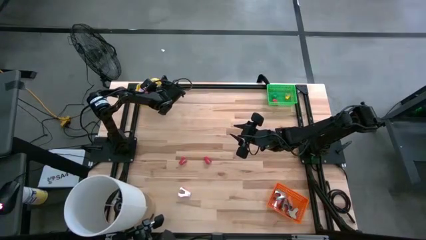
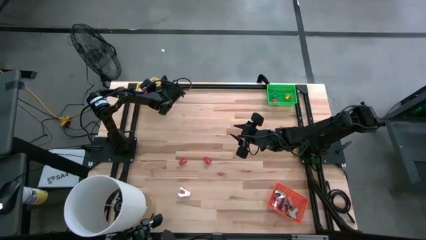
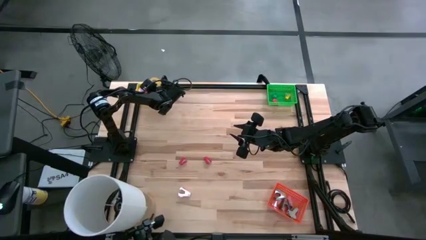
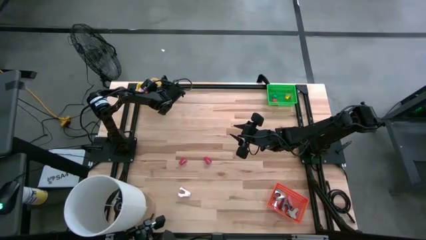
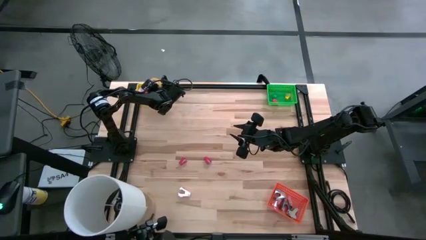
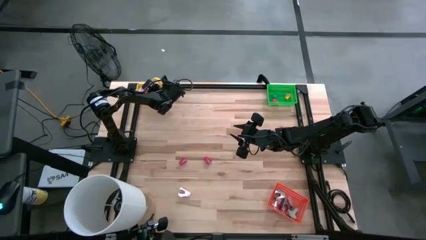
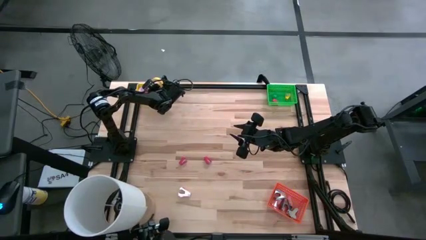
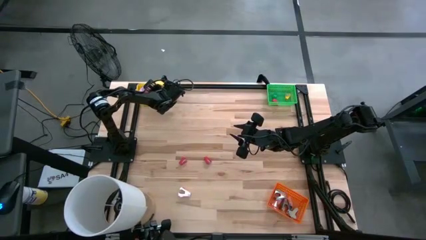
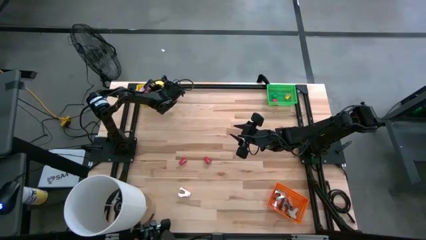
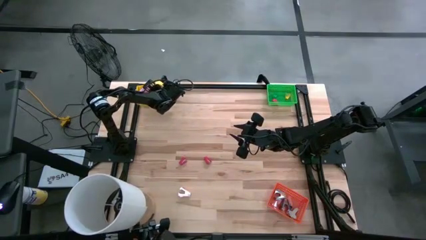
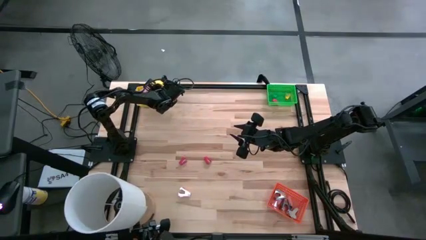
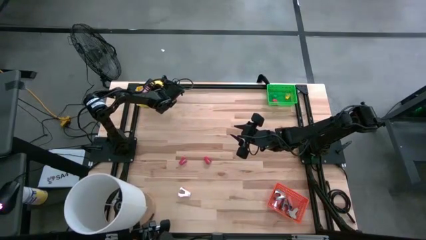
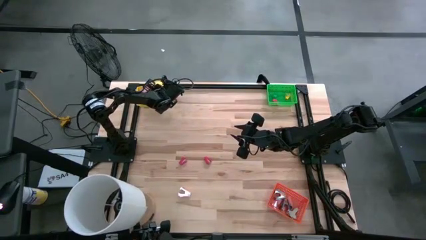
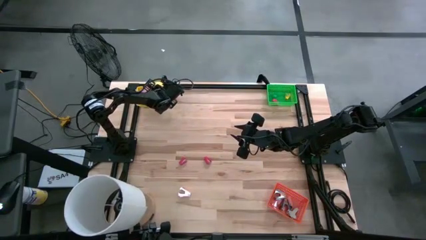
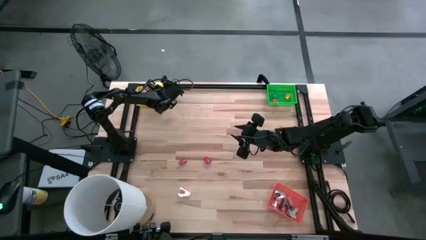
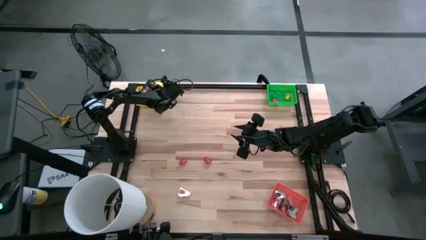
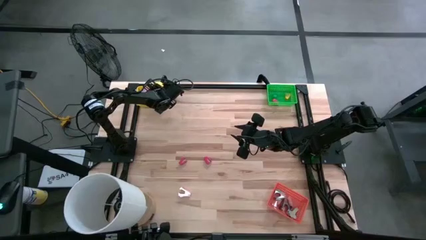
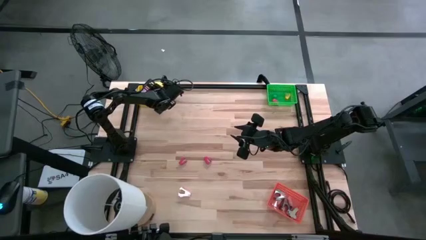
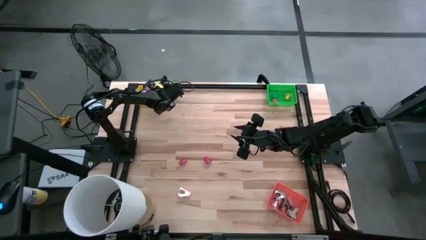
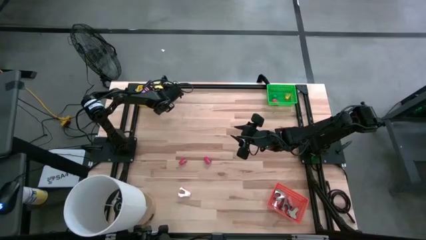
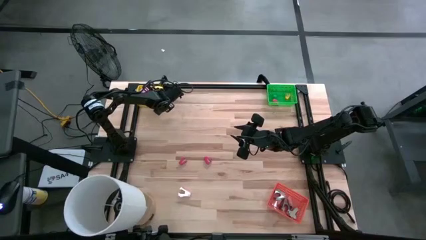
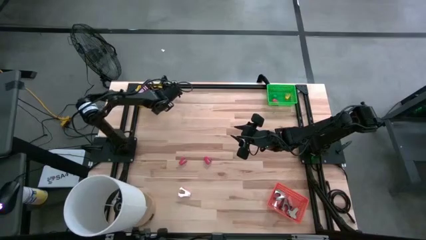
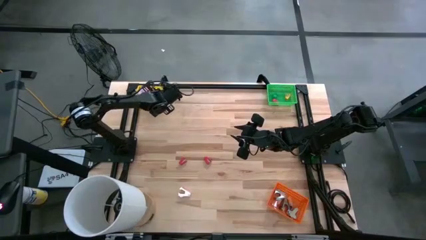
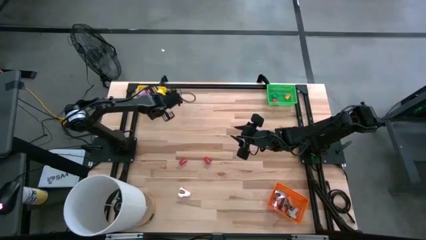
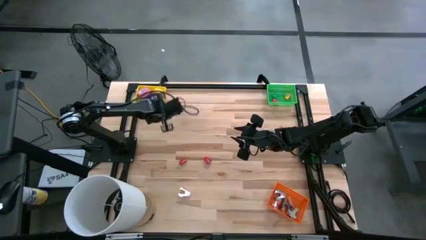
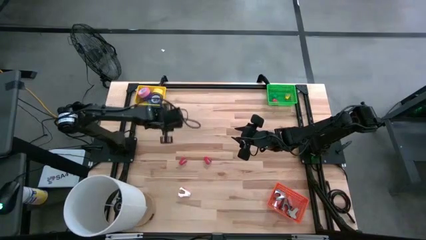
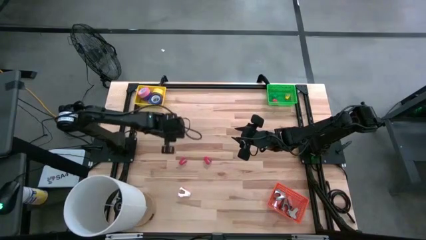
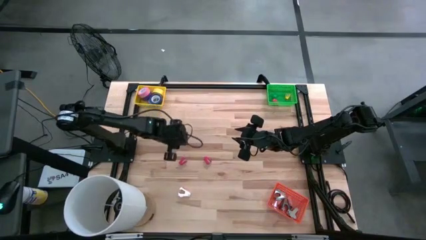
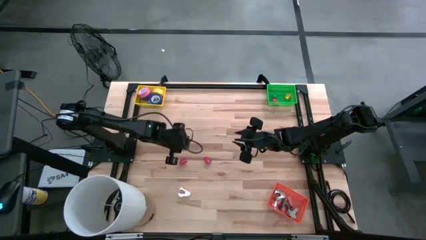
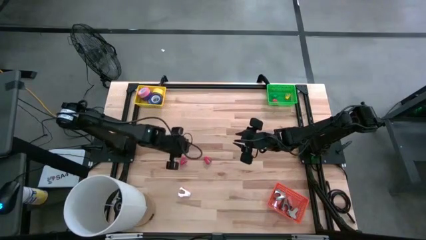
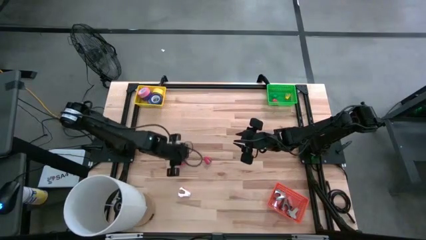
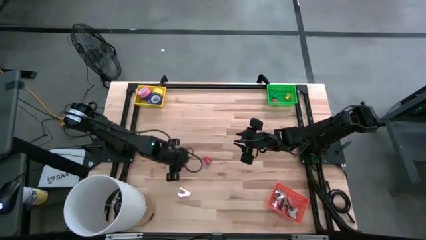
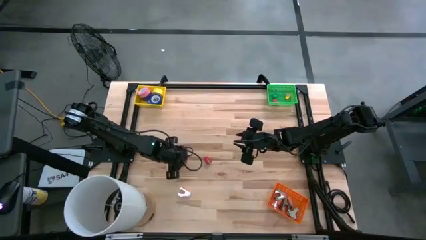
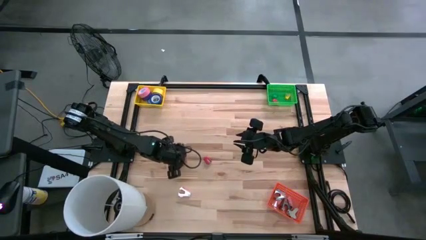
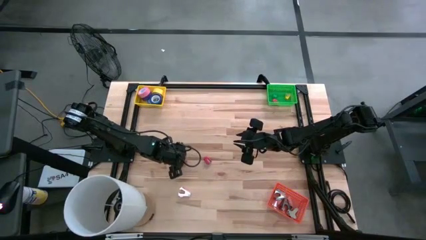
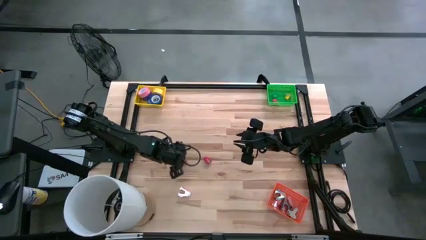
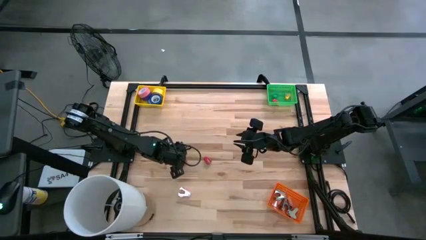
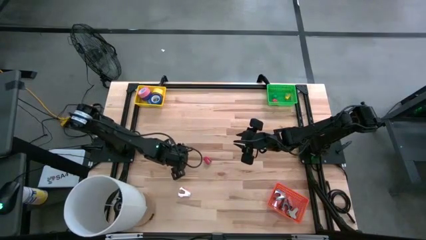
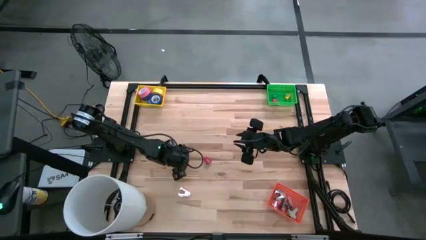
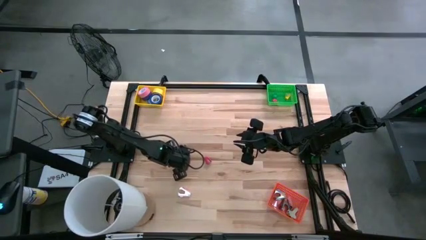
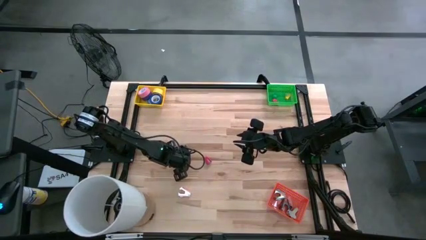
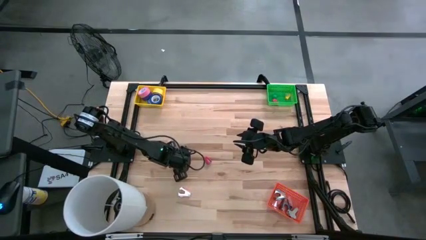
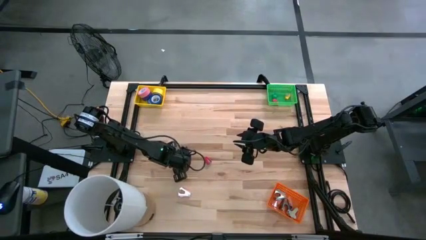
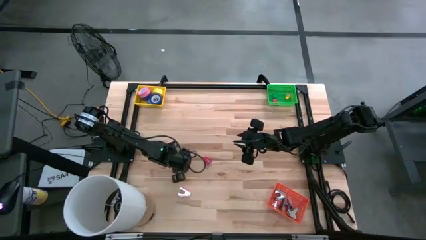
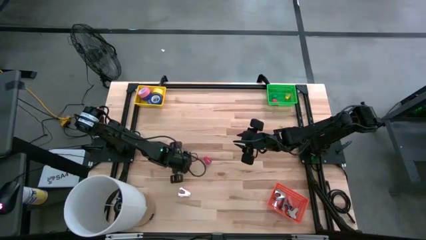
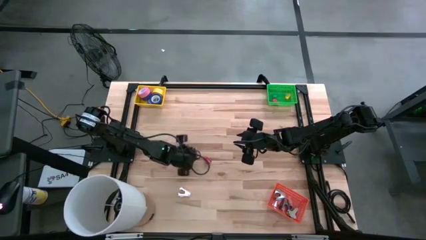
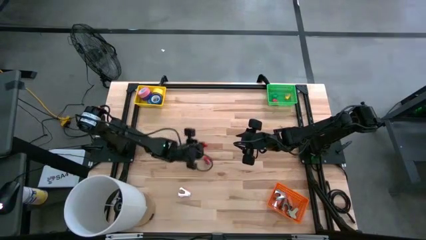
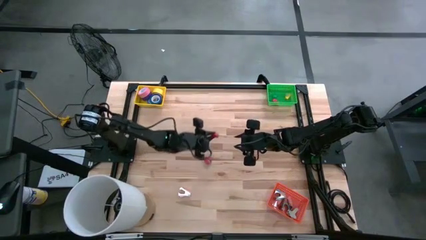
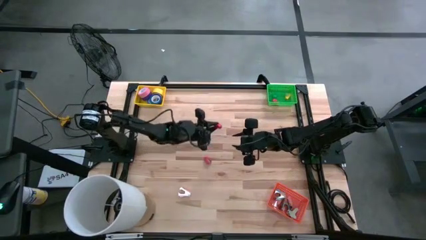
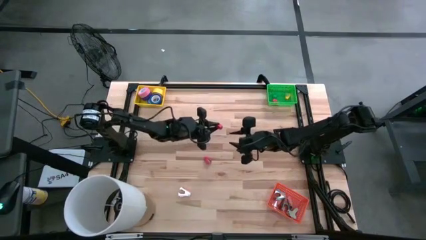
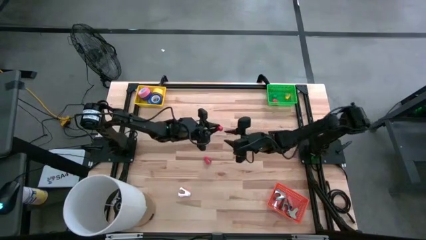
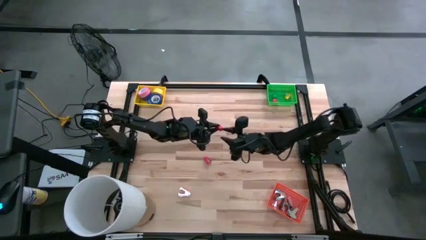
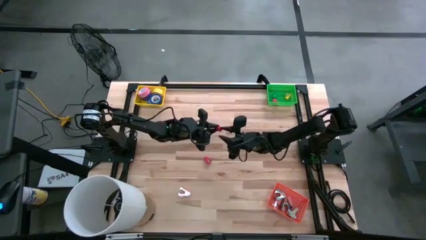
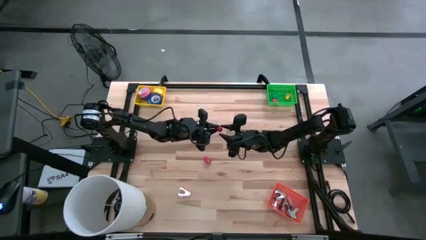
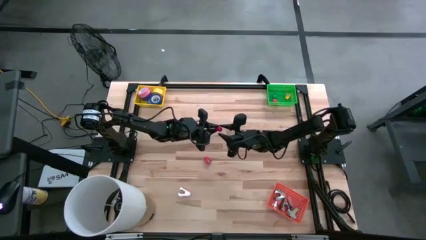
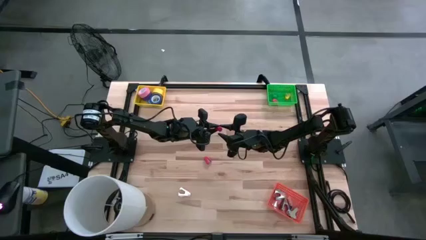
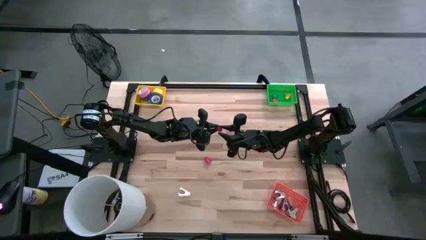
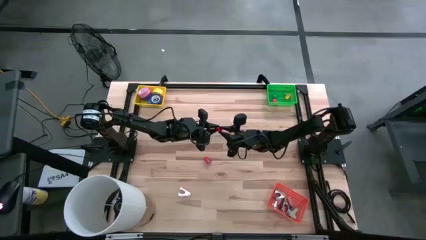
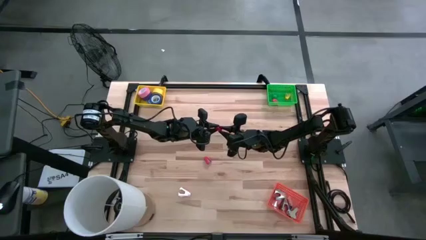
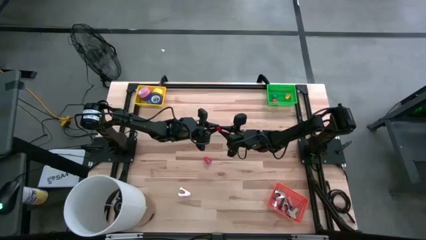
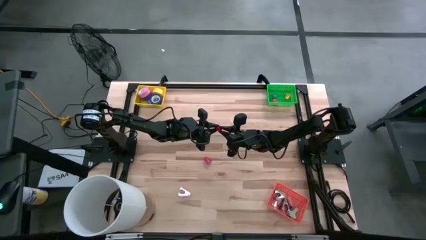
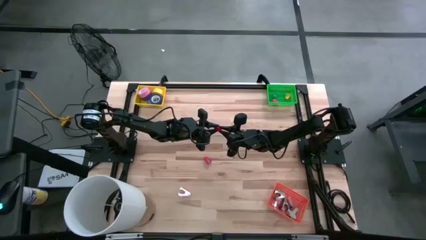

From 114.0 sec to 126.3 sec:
Task: Pick and place Stapler, Stapler remover, tape
Put the left red stapler into the green bin

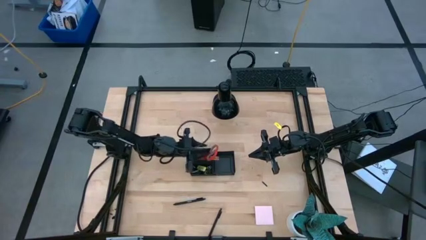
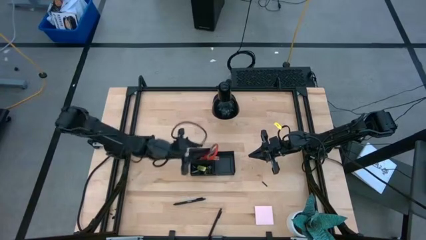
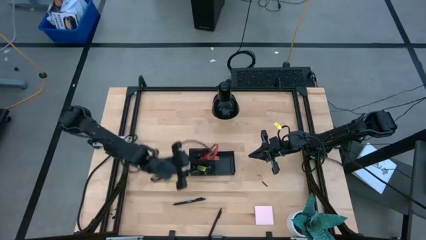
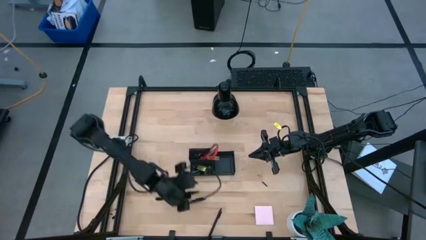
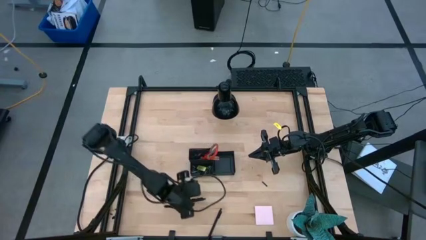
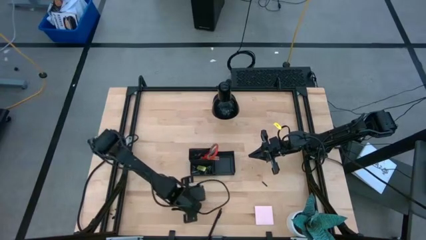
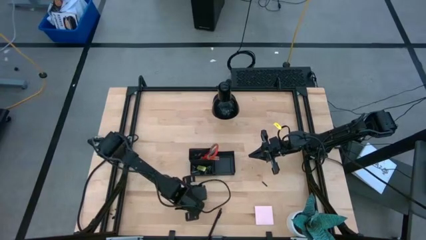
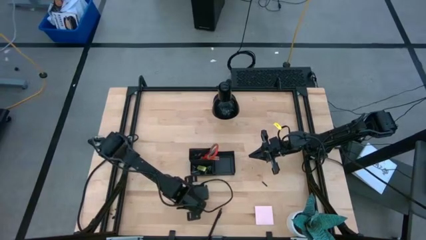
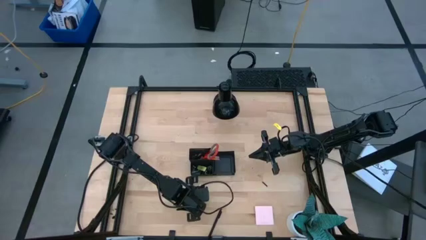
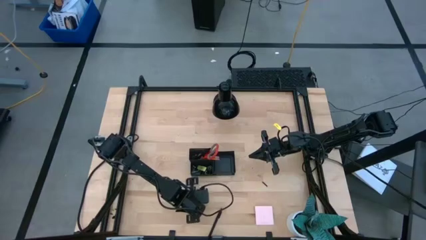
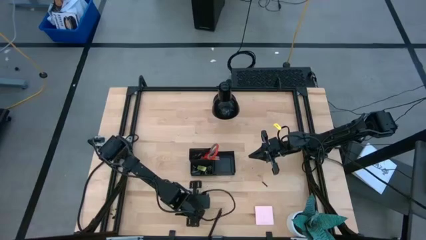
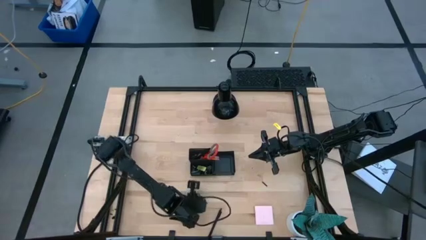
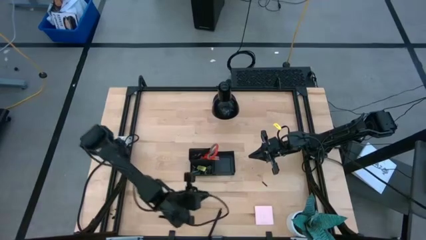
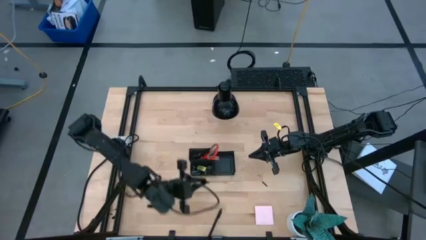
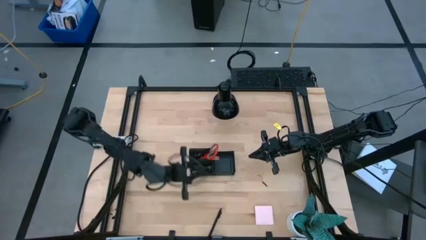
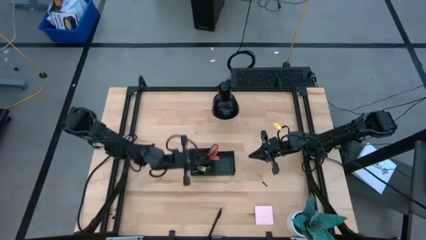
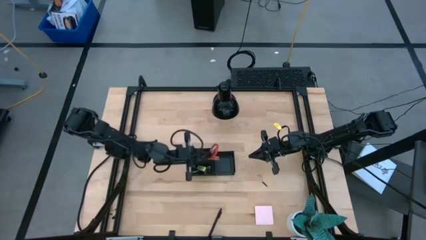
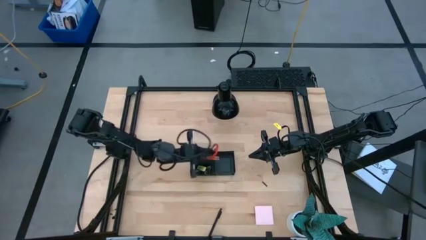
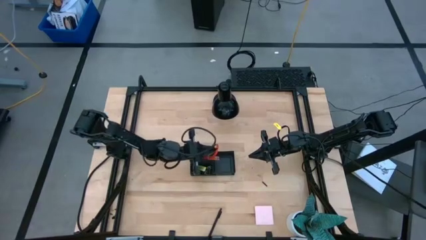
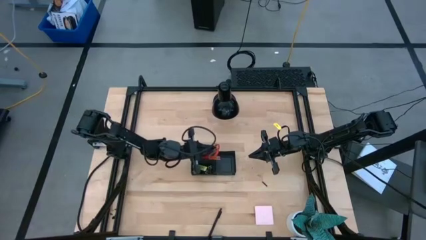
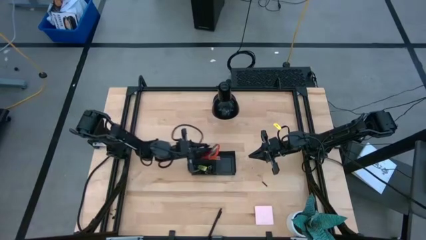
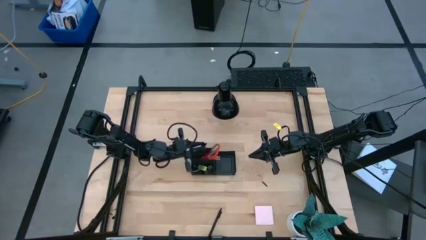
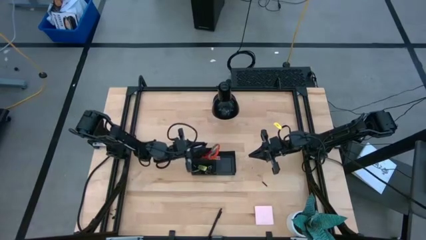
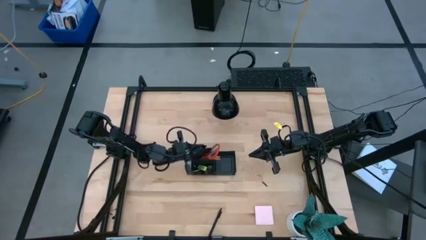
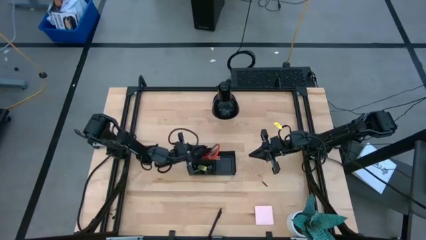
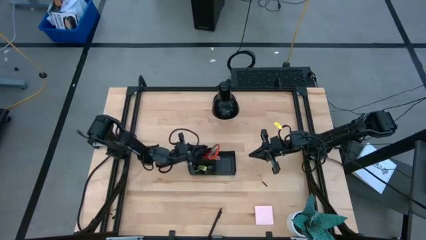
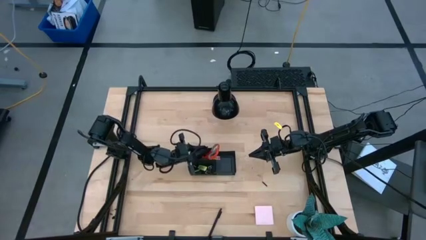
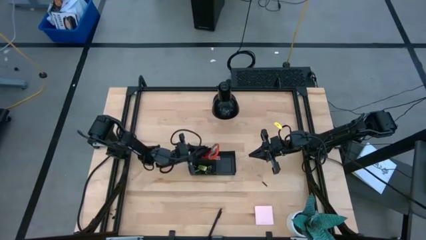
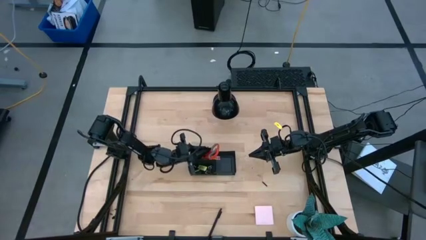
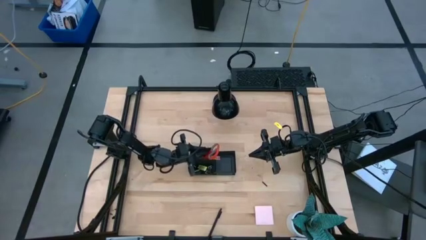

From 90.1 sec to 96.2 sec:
Task: Pick and place office supplies into organizer
Put the top pen into the top left section of the desk organizer
